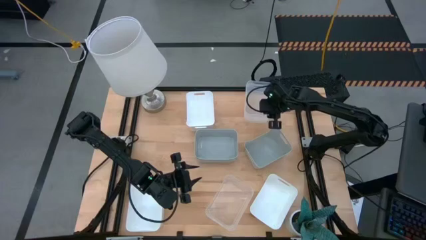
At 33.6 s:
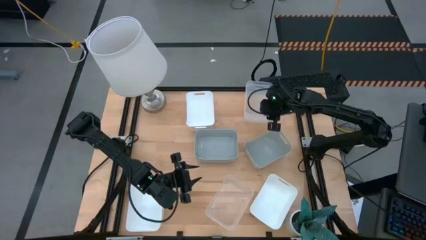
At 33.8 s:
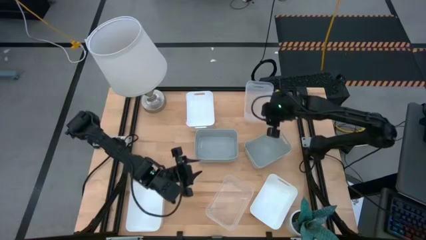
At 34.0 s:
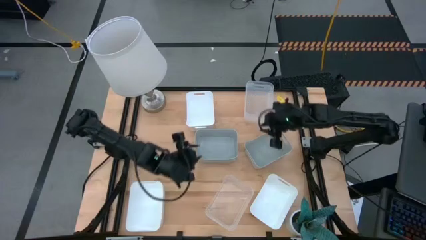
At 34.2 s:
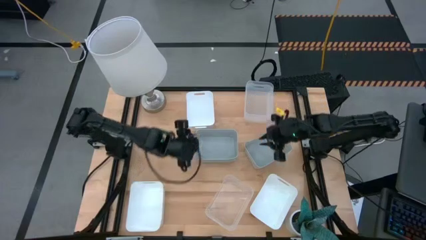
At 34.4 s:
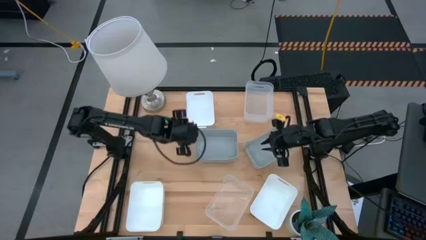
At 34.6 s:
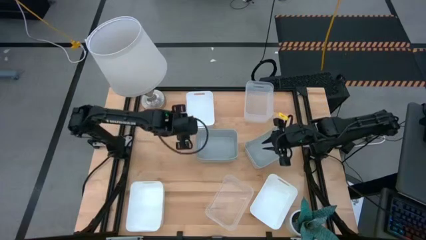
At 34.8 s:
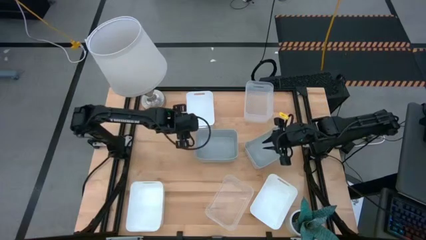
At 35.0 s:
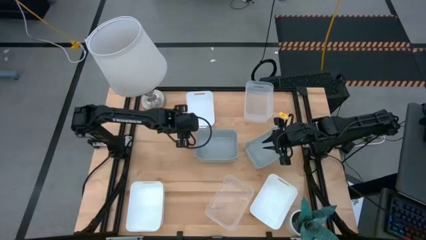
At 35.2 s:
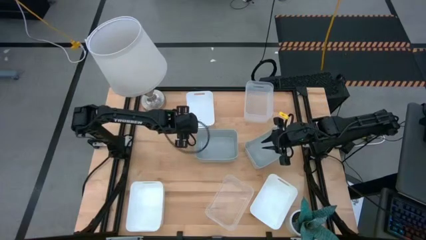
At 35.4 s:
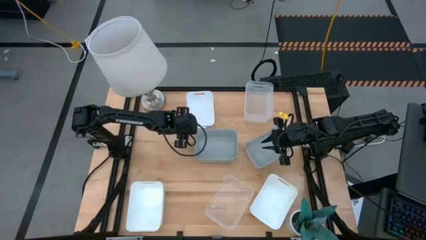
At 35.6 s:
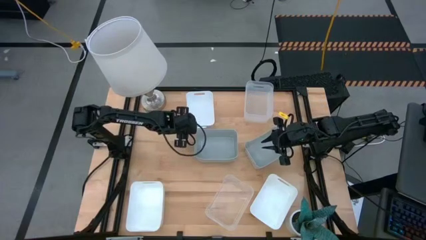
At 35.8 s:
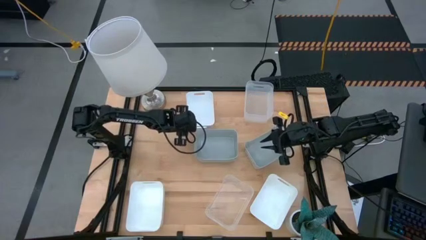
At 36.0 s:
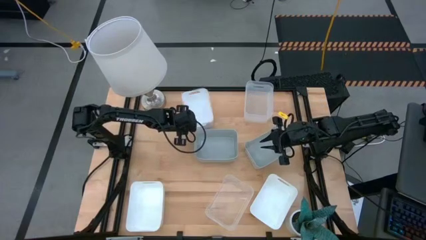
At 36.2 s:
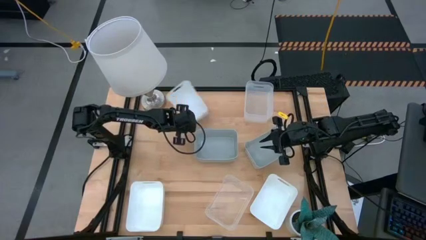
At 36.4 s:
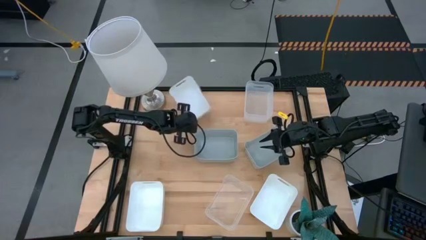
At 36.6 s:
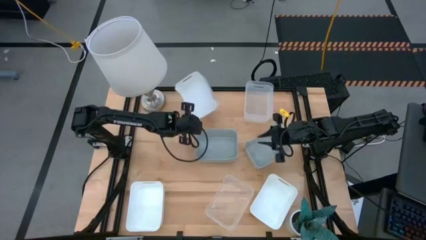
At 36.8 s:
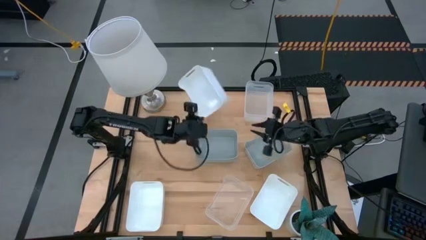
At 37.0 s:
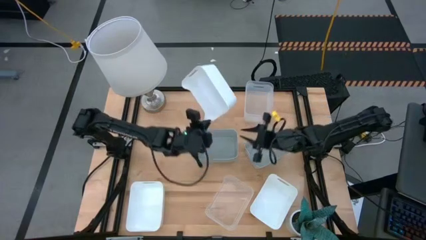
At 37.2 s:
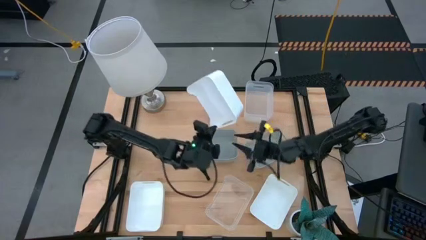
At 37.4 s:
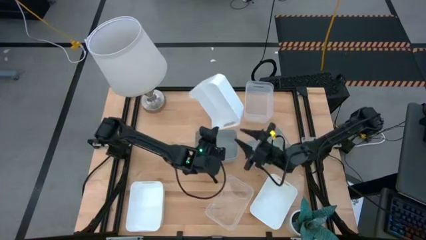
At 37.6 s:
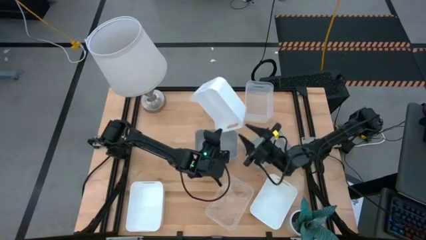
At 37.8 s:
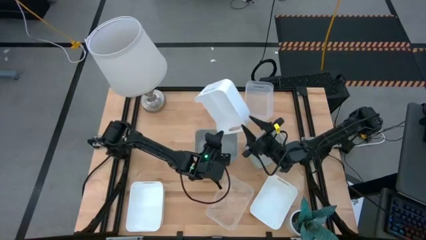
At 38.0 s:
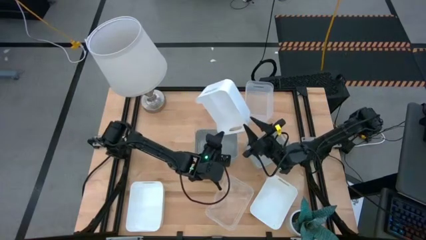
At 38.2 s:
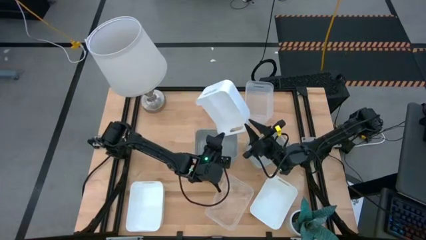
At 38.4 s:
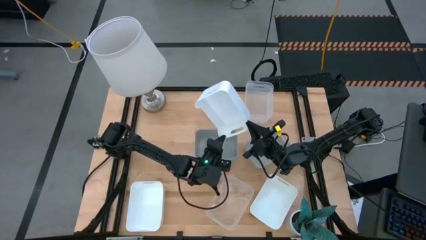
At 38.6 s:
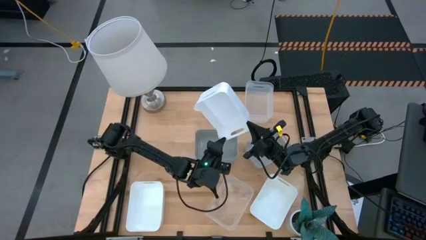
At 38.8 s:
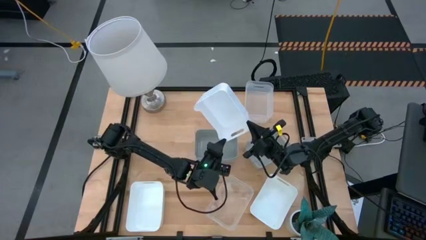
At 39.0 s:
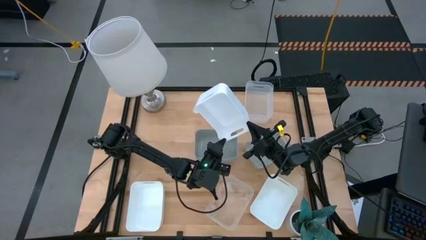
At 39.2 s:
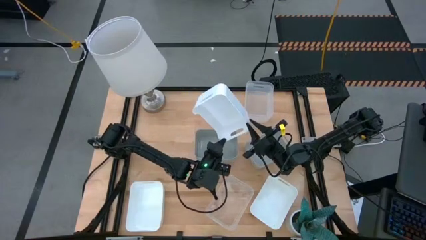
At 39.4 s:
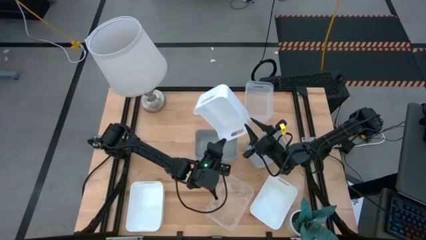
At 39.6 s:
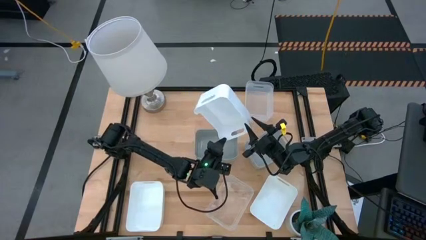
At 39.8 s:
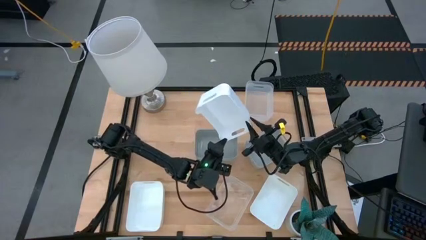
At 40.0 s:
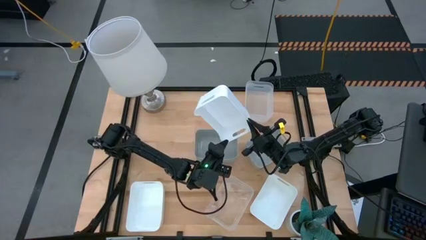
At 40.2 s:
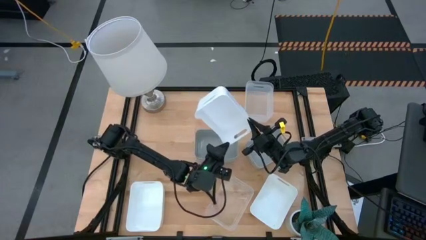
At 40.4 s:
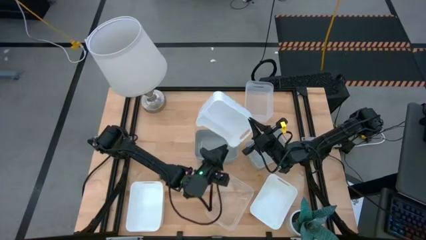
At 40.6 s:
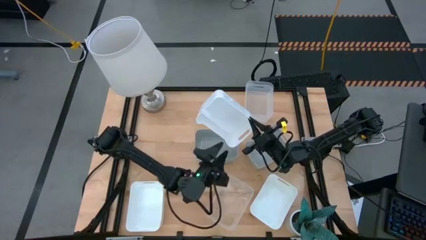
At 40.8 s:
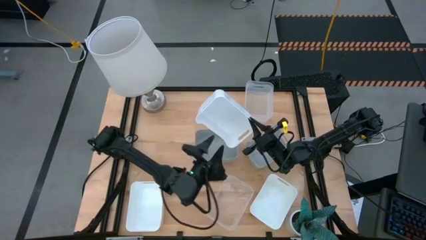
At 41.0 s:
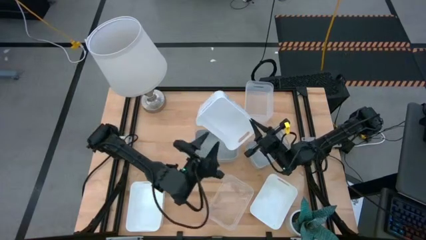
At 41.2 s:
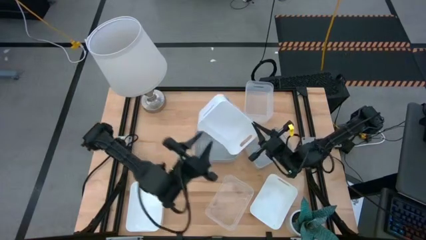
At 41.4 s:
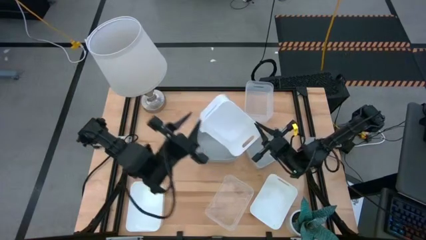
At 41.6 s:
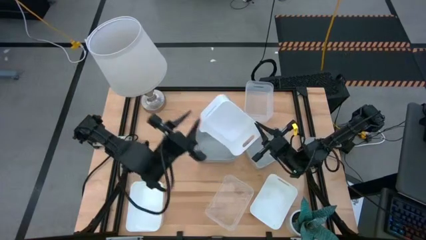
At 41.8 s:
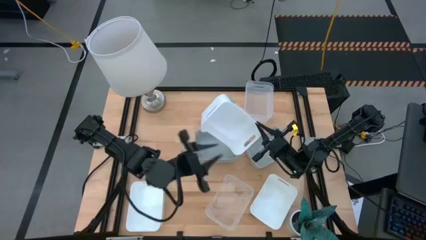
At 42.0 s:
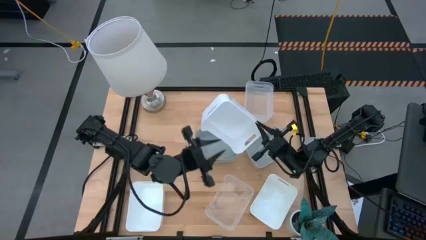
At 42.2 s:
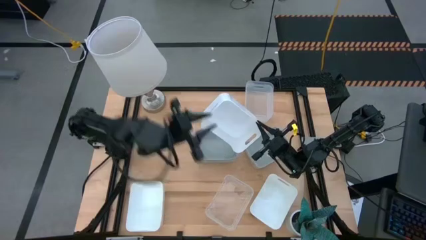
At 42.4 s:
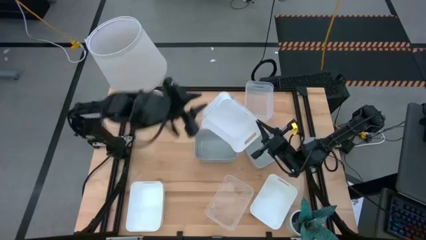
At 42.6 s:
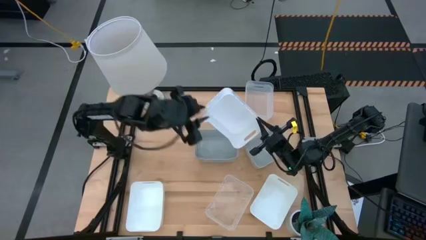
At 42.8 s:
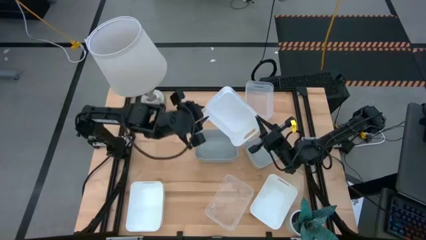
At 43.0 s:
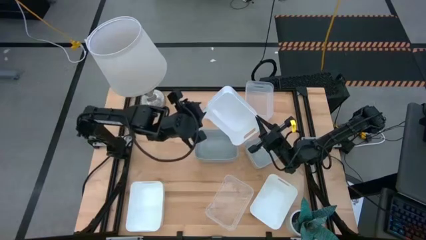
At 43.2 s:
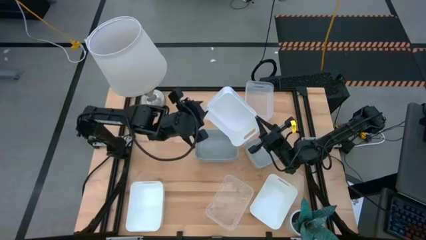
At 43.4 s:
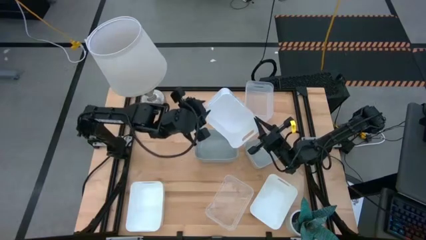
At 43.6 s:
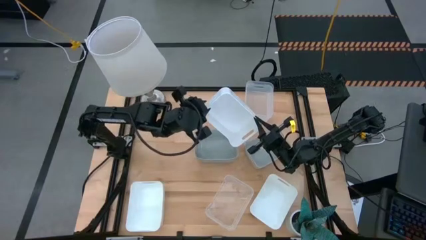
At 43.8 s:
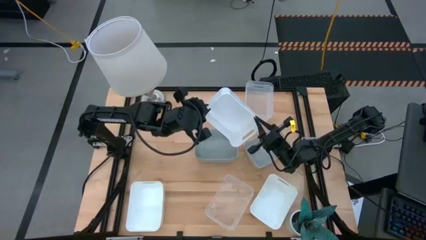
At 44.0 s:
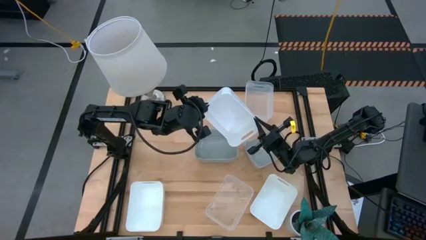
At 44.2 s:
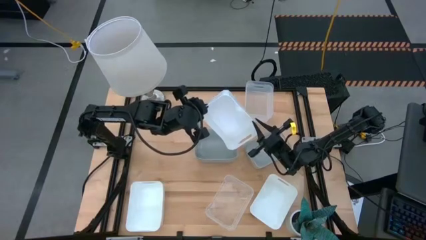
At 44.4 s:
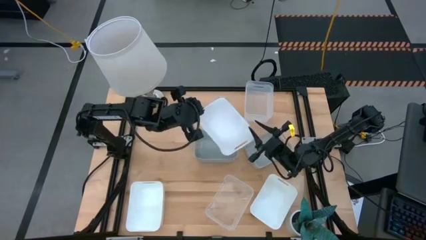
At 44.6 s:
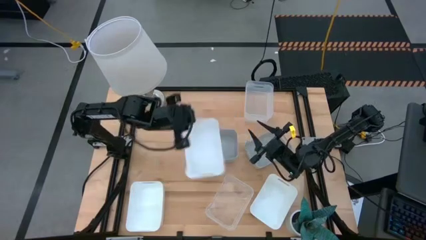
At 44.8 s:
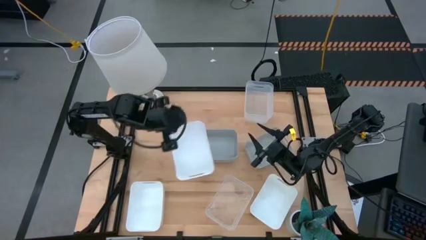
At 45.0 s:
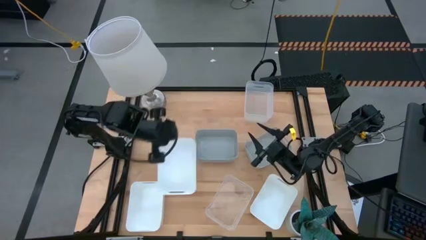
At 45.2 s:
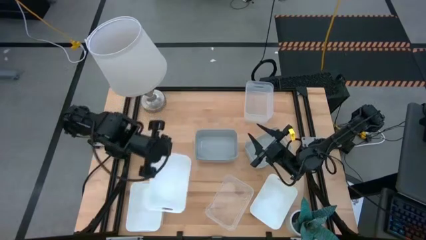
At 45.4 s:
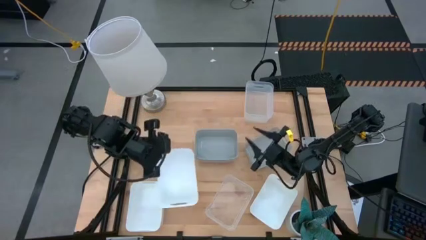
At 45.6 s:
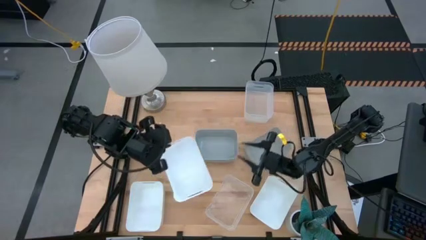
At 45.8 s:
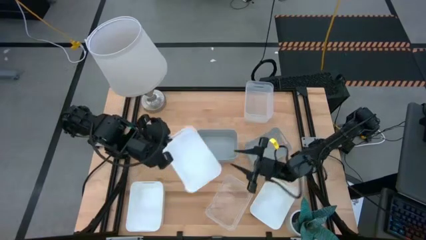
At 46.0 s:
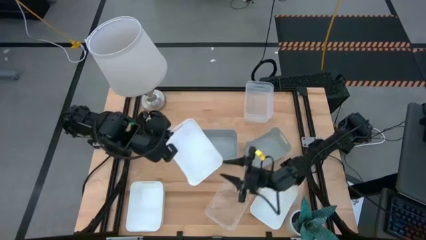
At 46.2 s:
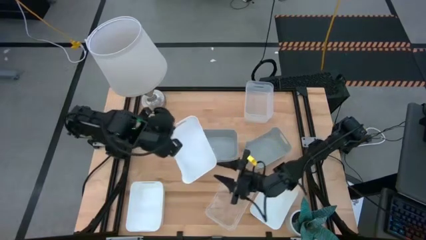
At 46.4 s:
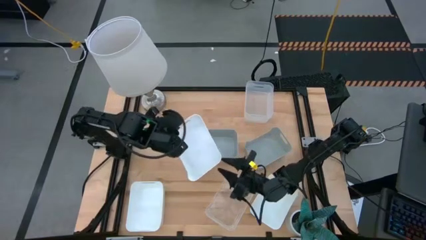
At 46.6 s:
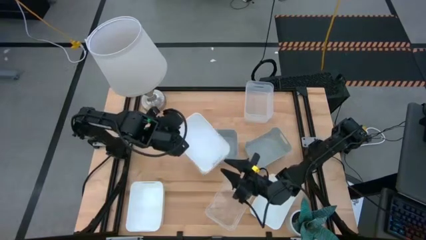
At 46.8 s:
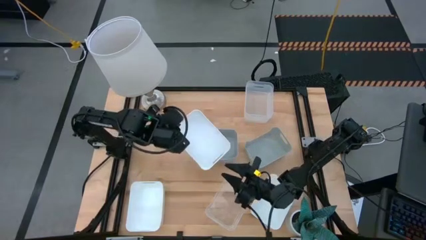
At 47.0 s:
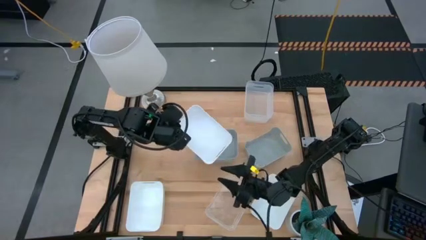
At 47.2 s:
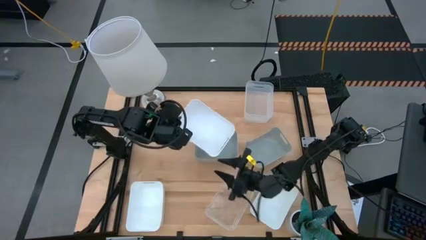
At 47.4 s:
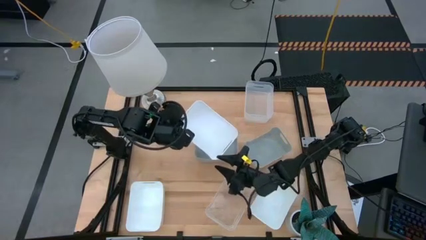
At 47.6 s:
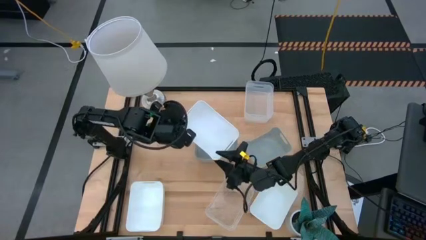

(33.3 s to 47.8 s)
Stack the top white bin on the bottom left white bin
